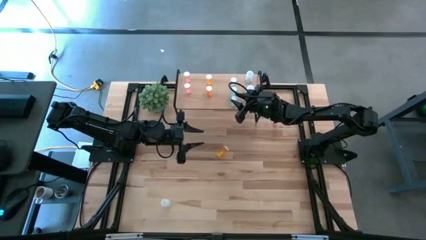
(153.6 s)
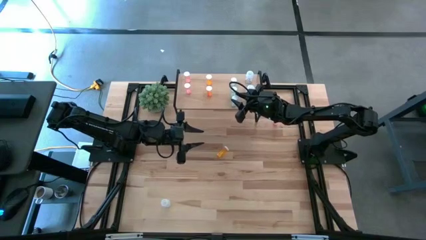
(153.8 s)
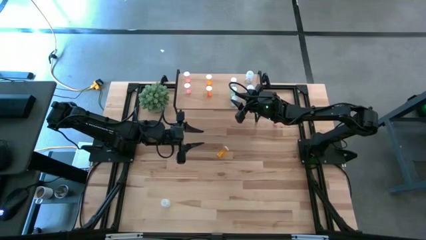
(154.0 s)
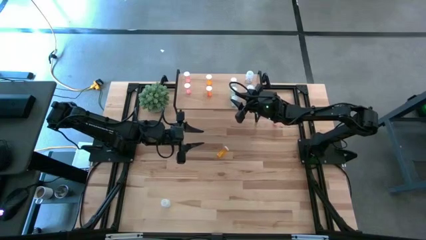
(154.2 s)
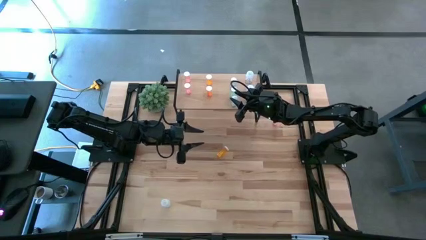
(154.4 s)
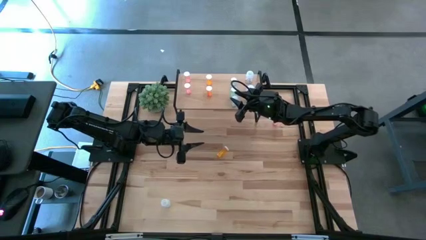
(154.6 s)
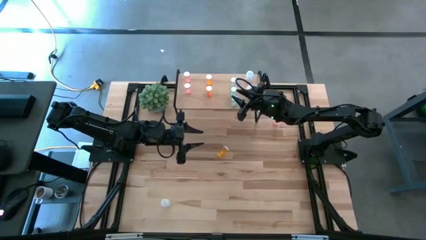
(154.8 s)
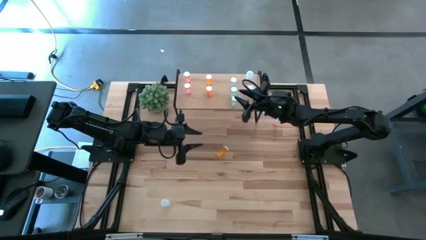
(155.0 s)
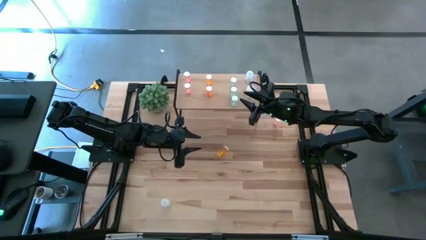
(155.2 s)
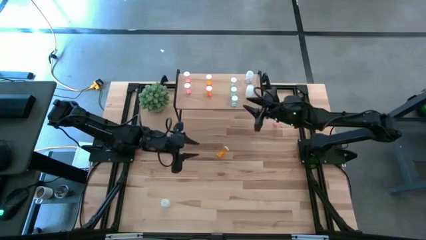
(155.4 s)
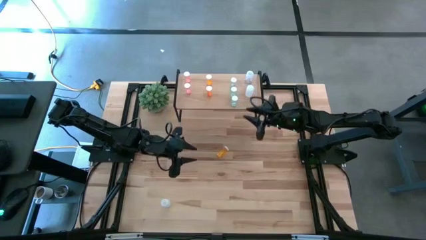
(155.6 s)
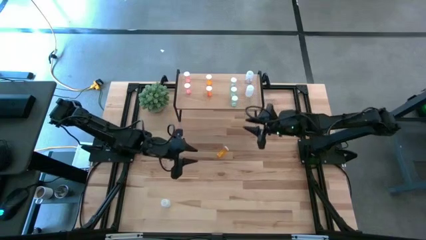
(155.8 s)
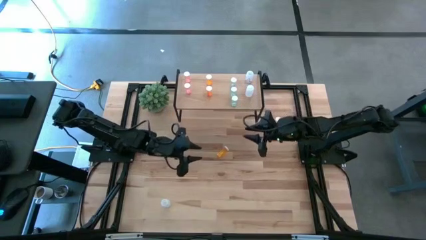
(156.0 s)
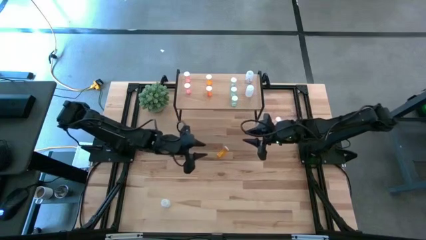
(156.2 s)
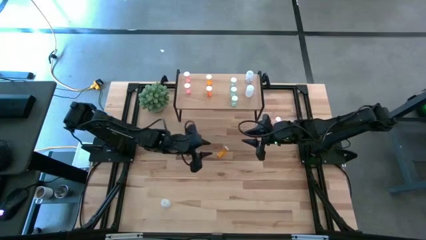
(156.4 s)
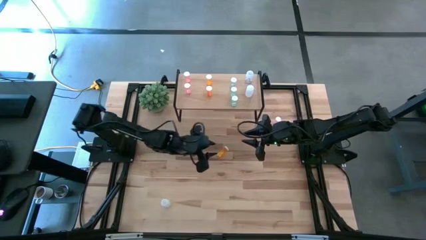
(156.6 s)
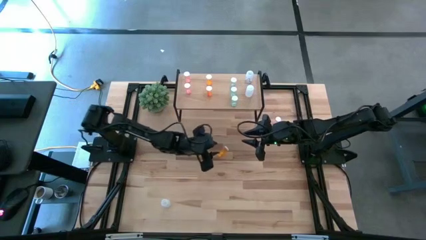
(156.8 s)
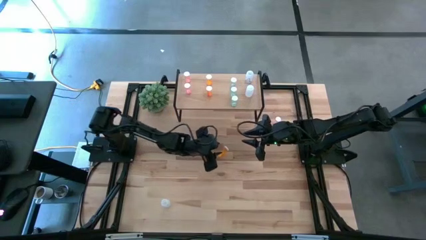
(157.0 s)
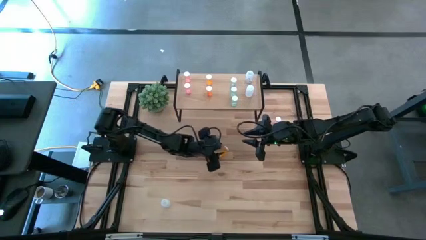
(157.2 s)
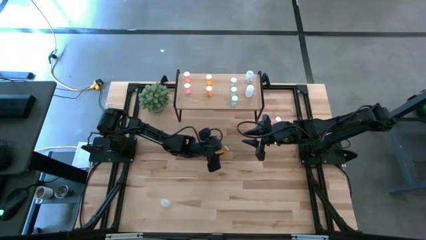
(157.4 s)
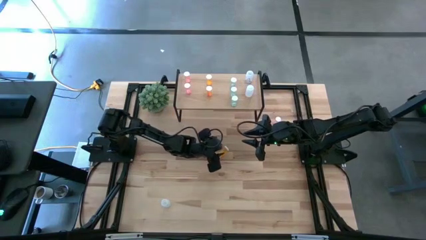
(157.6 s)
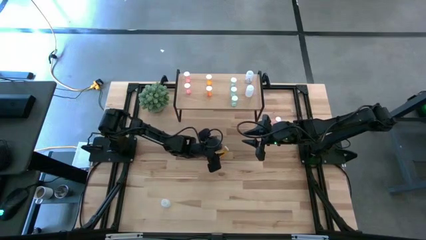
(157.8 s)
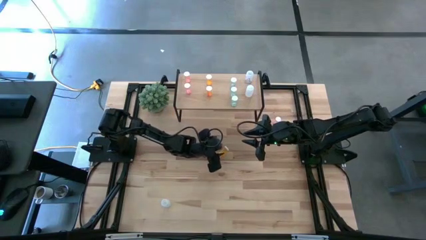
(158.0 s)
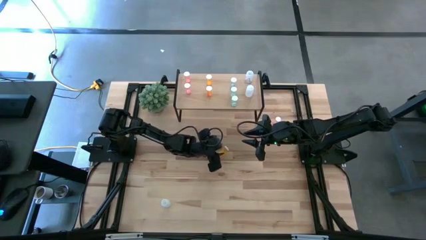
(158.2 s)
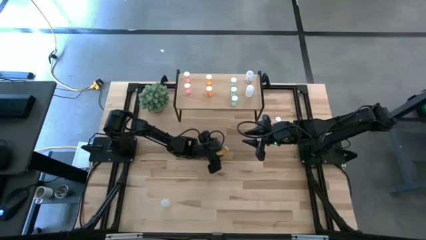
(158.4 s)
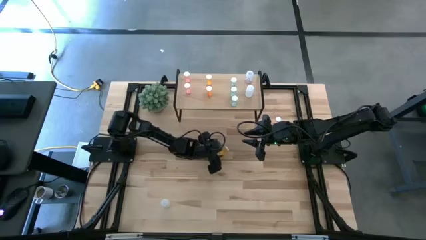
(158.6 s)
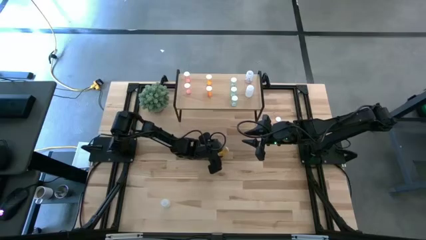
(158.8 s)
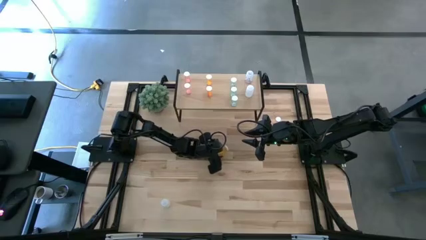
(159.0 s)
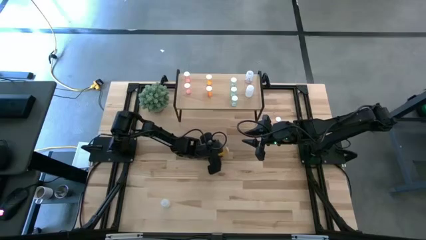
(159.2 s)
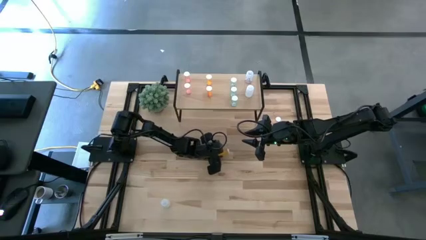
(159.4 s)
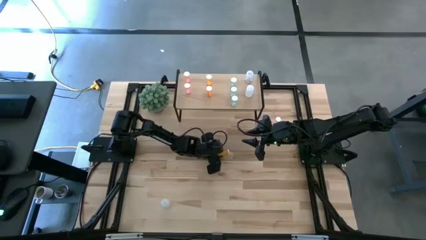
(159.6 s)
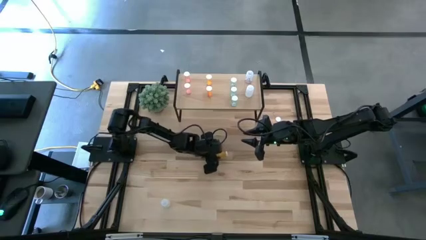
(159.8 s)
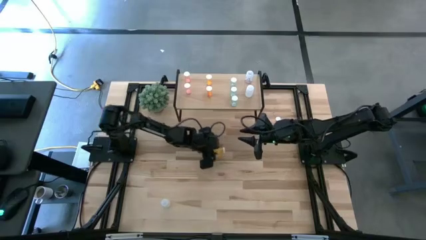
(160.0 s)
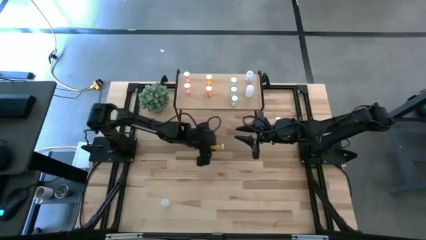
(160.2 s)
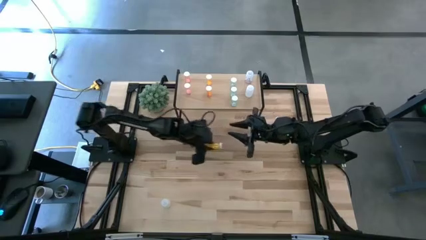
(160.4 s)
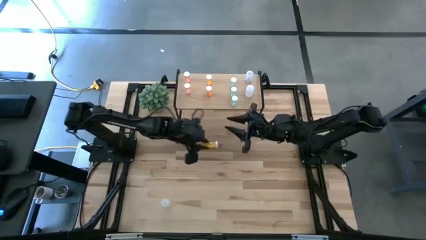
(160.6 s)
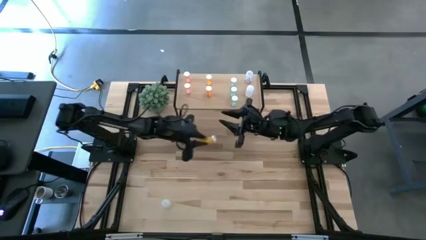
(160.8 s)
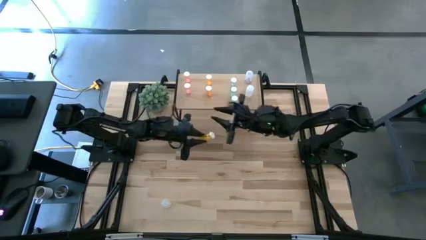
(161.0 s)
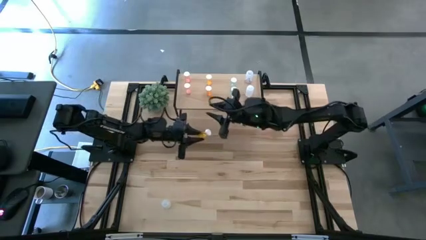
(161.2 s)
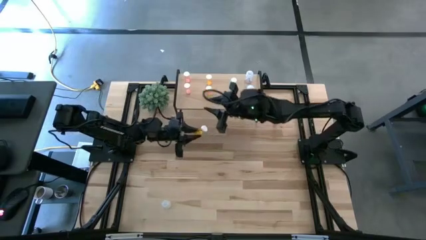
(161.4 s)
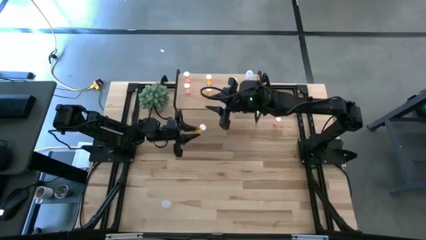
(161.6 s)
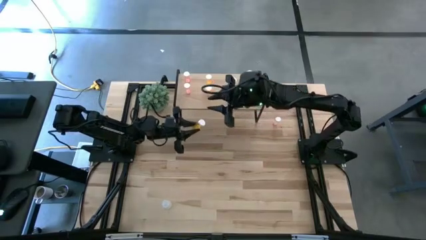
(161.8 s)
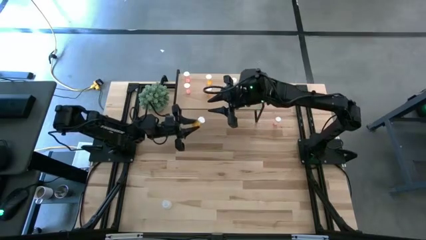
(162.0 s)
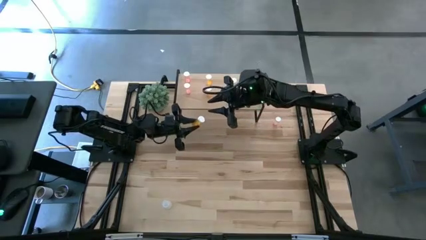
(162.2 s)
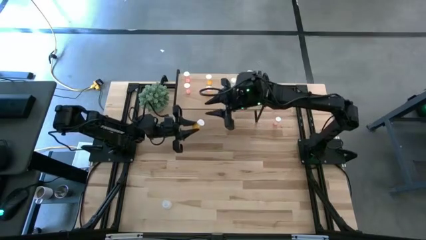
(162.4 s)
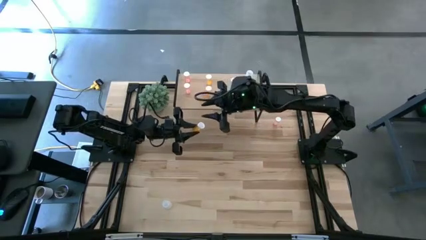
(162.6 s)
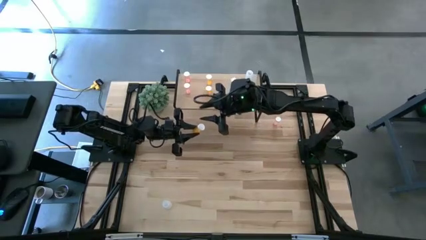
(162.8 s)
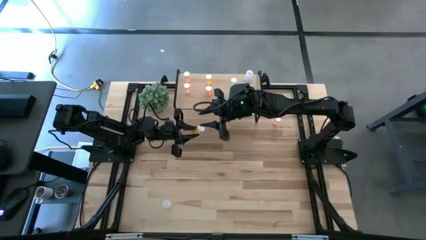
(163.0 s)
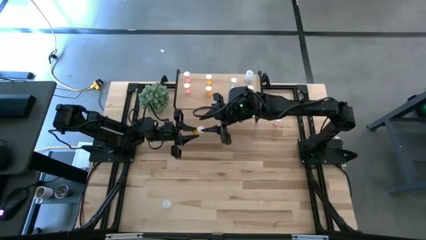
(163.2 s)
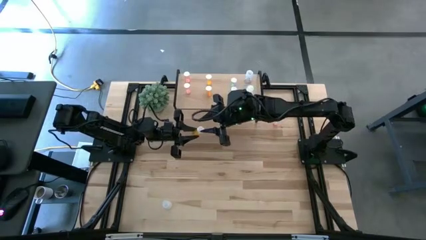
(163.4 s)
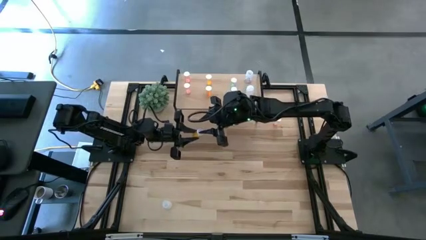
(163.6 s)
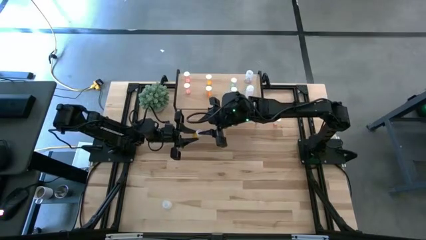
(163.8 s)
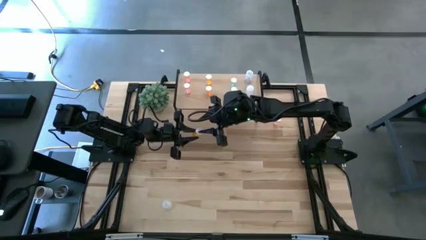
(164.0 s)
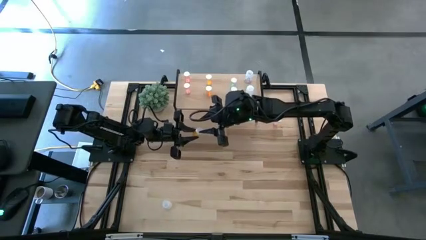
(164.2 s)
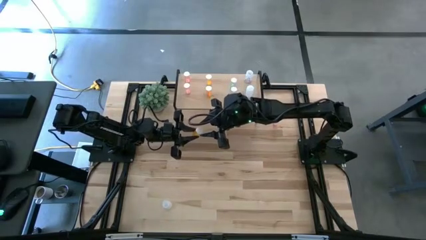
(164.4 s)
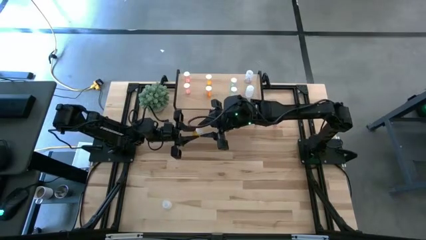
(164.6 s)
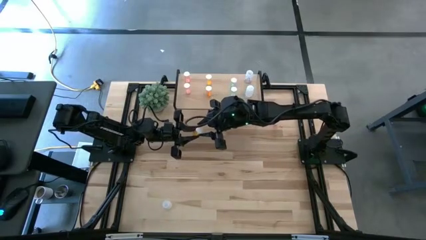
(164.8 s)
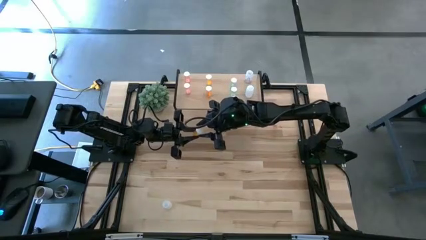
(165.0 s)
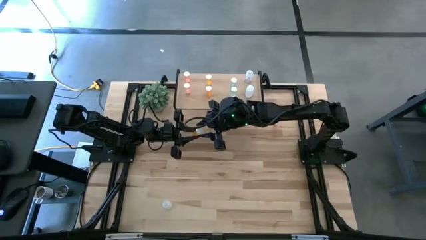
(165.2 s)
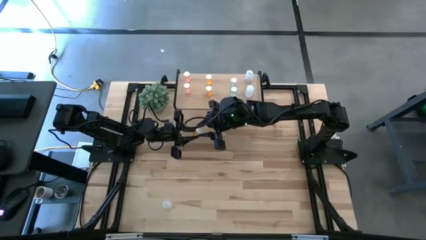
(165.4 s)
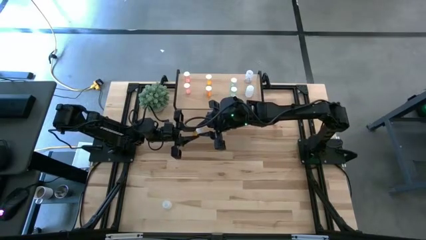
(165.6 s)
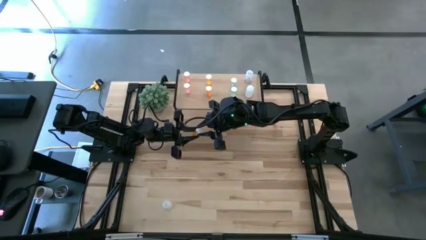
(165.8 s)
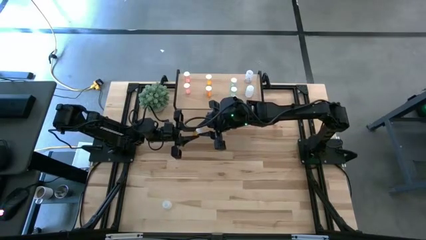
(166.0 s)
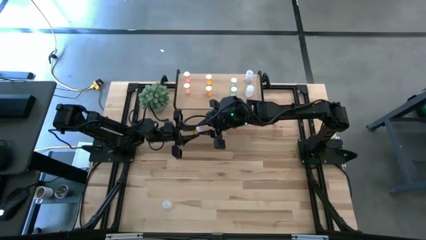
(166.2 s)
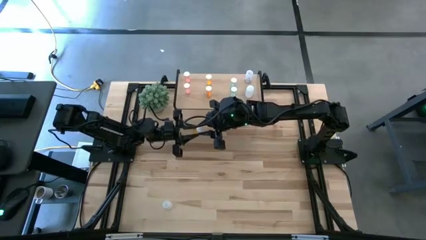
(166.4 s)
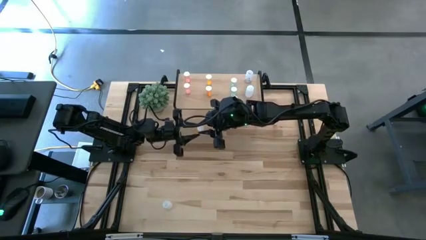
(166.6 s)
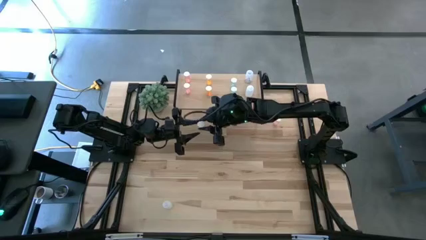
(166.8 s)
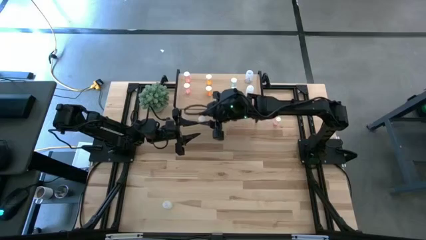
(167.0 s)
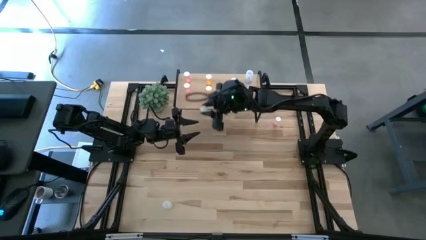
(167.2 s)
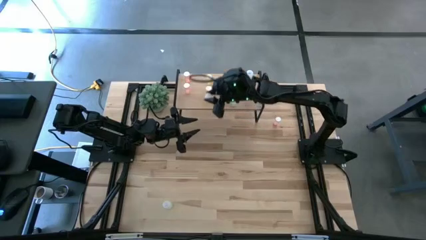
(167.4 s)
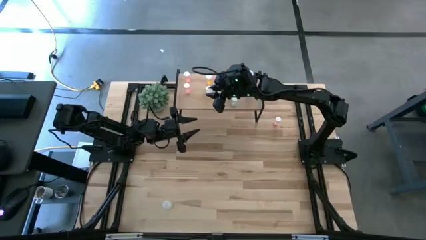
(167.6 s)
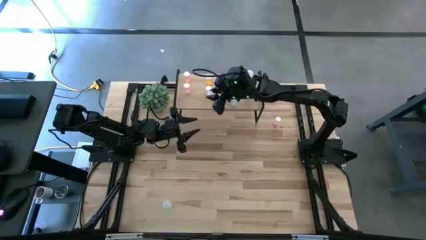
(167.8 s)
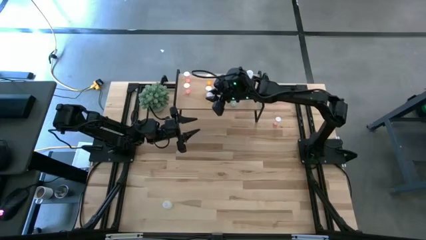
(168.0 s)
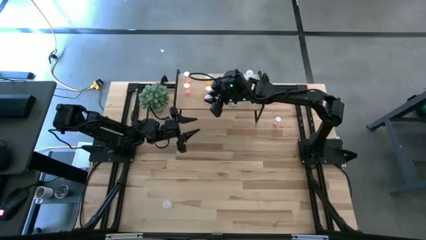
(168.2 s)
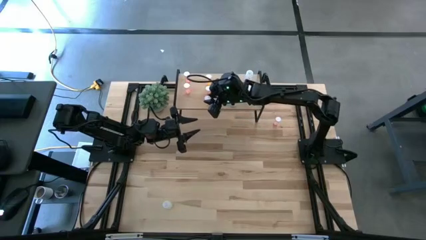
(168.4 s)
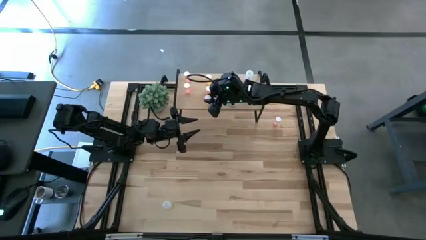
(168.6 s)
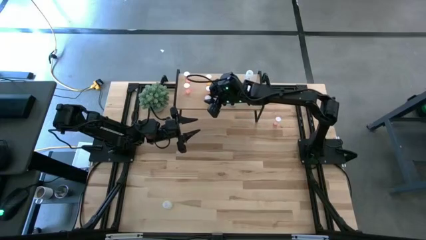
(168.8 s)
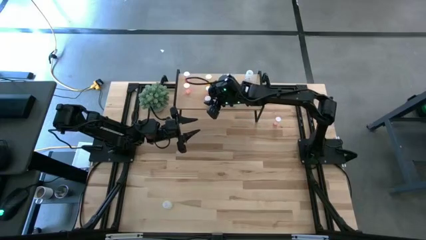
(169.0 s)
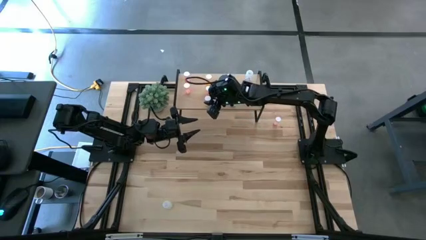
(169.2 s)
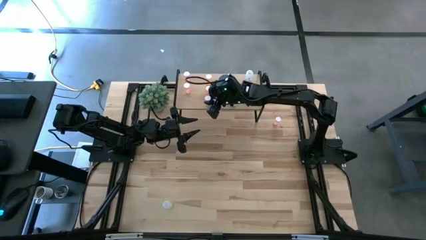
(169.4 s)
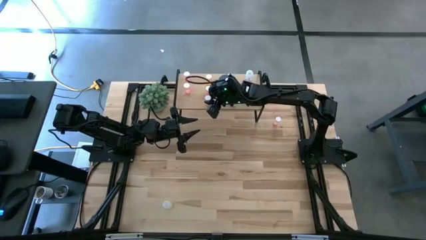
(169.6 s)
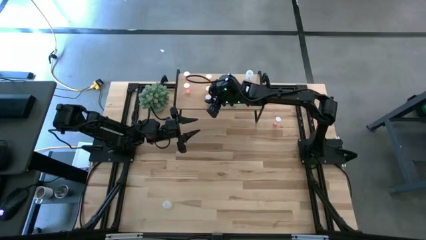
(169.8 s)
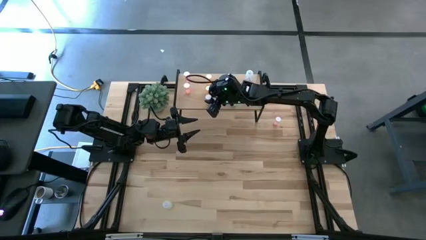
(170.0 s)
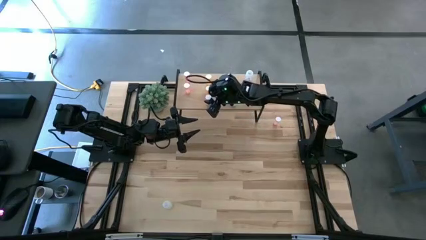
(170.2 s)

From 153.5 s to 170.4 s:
Task: Pick and place medicine bottles onto shelf by color
Put the orange pill bottle on the shelf aligned with the other orange pill bottles

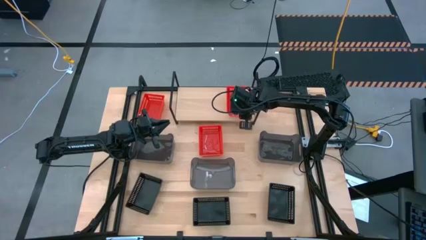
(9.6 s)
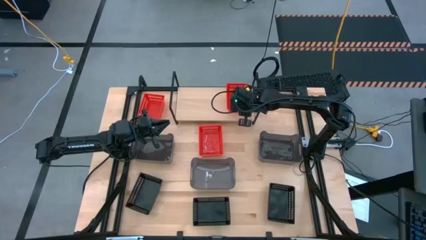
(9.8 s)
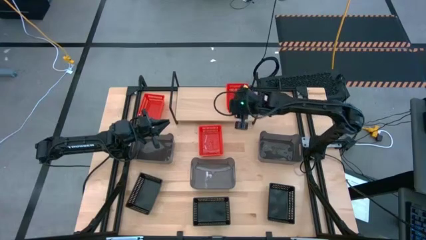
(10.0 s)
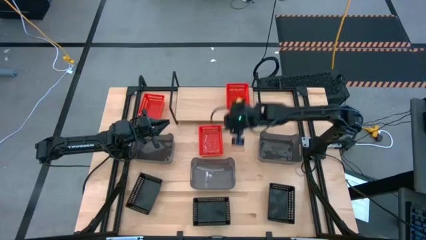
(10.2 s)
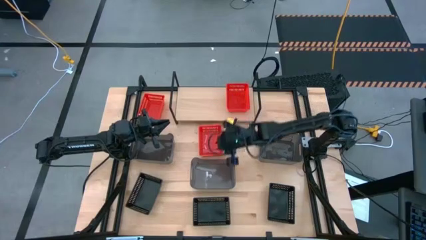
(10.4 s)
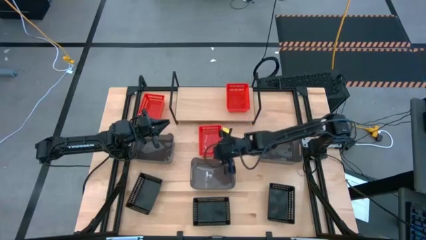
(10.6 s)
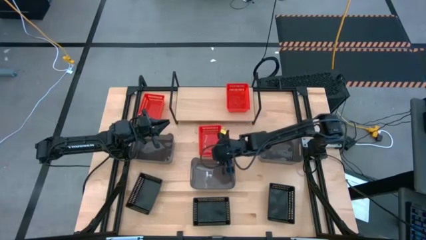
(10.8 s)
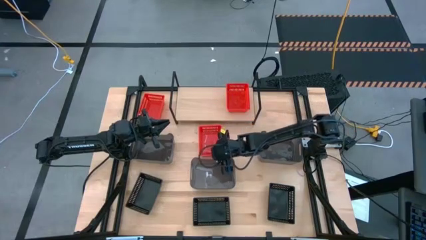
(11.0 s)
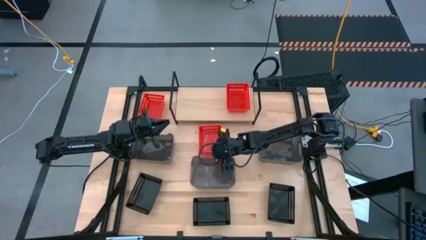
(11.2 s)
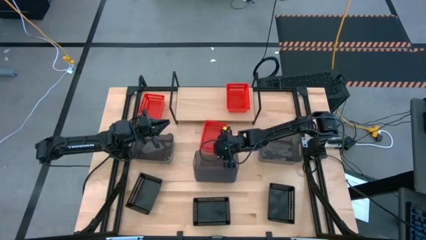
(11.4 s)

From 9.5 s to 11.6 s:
Task: Stack baskets on shelf by color
Stack the right red bin on top of the other red bin on the shelf
